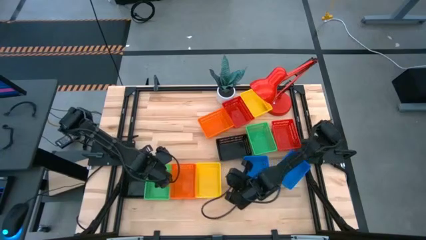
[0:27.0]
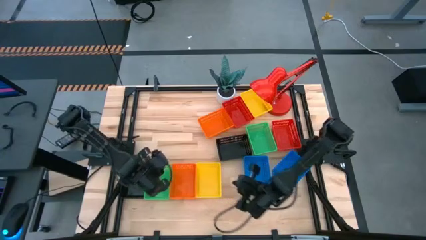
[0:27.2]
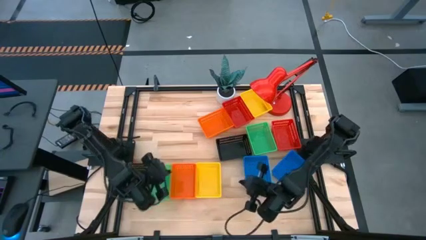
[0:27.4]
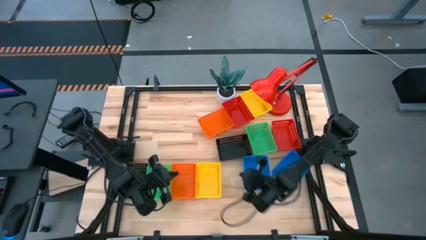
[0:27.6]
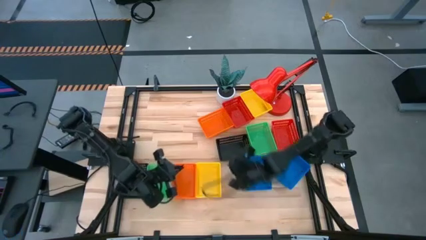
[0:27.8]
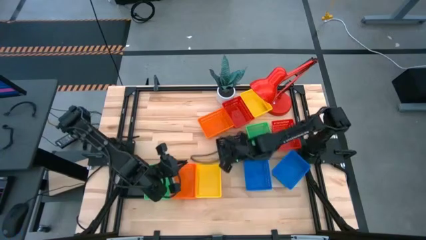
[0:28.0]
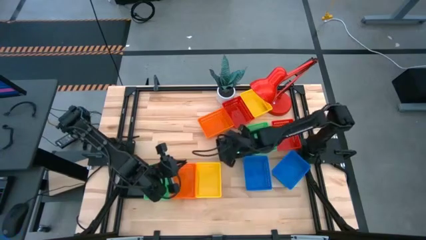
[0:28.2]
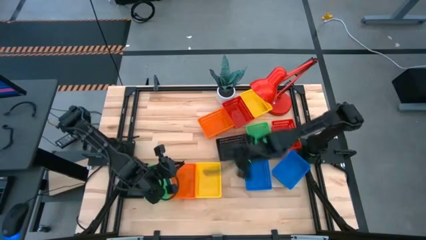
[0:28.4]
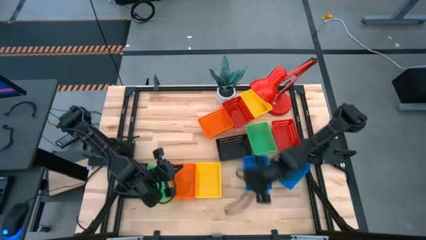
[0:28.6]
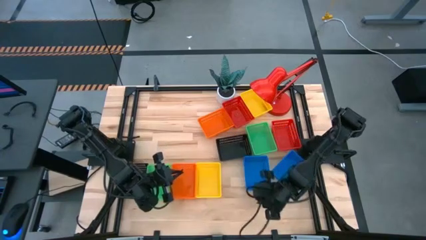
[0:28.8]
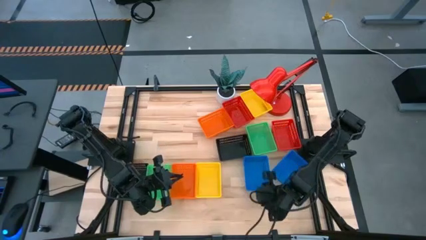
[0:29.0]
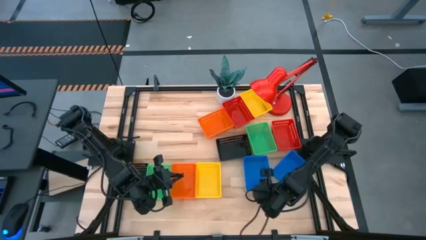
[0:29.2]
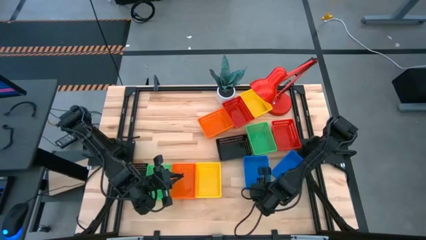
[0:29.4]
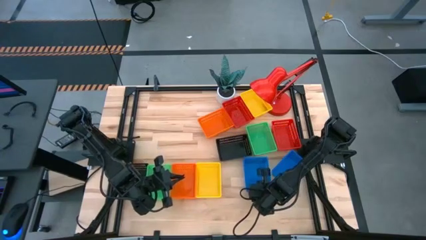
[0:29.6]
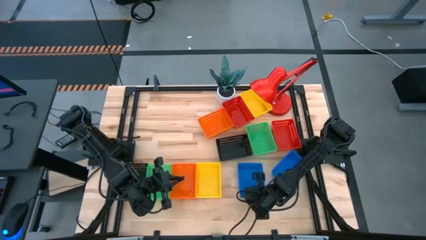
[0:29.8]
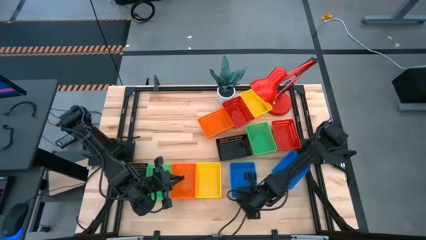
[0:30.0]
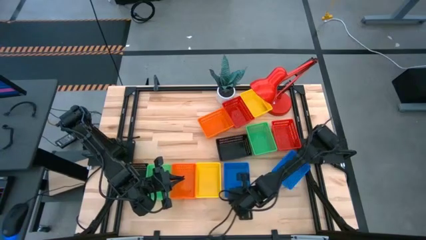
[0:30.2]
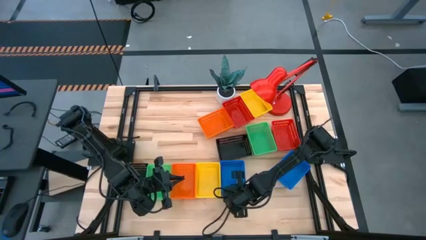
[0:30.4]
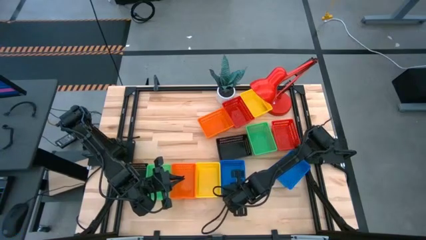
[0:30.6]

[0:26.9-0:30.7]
Move the left blue bin to the bottom center of the table

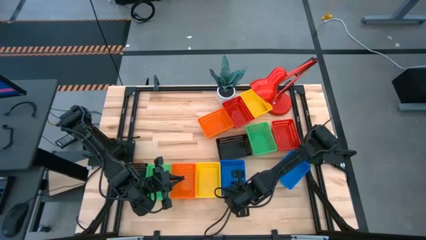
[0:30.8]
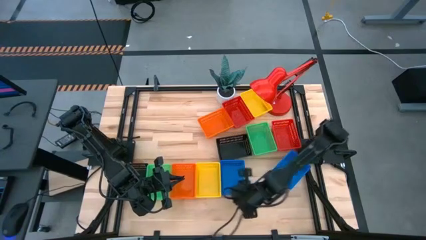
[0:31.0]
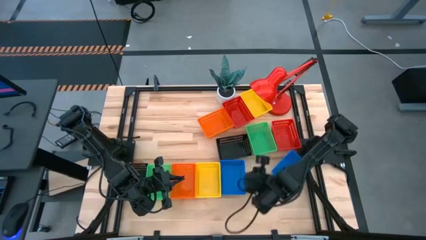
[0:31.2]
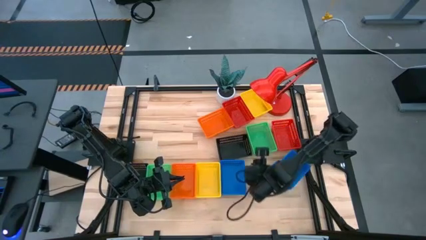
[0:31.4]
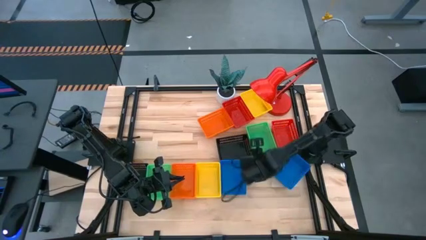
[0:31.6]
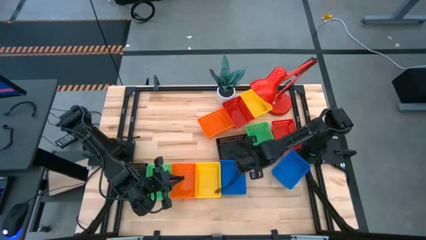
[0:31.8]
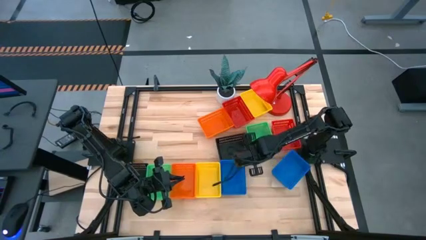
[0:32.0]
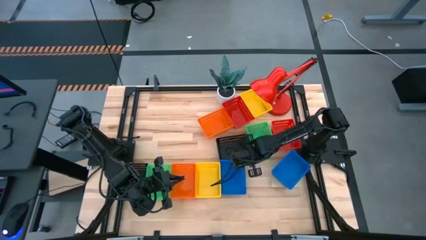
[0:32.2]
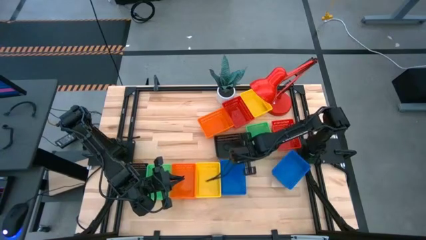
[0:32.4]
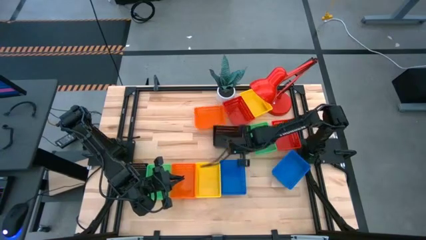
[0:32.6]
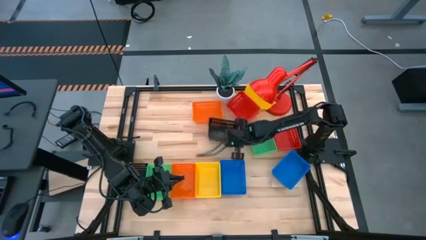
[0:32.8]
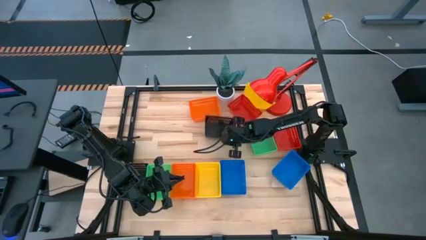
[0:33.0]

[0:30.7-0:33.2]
Move the top black bin to the top center of the table

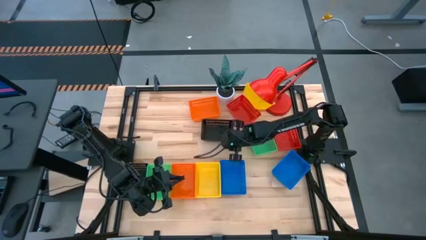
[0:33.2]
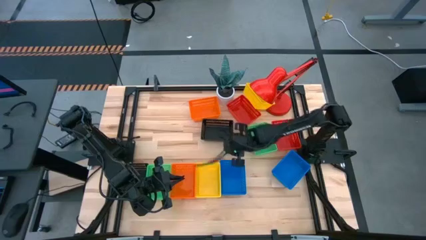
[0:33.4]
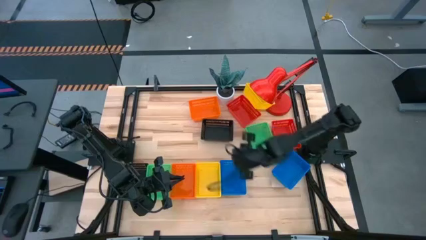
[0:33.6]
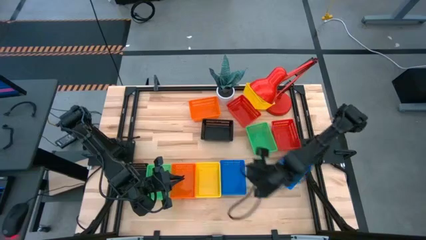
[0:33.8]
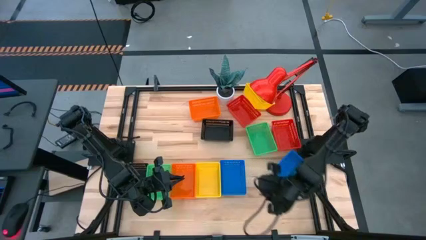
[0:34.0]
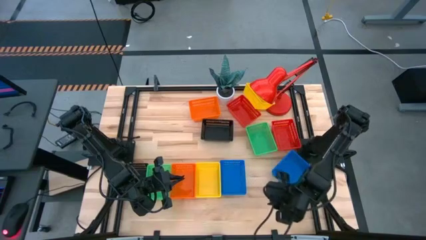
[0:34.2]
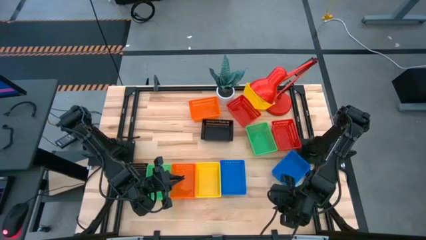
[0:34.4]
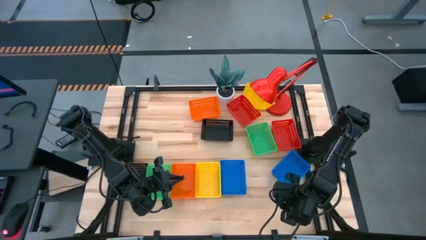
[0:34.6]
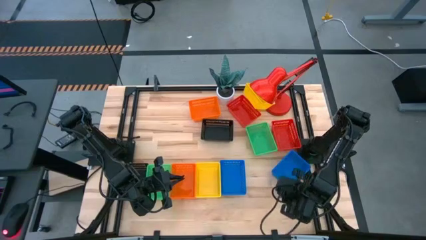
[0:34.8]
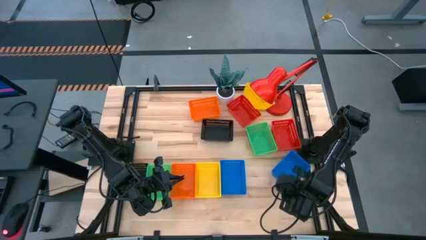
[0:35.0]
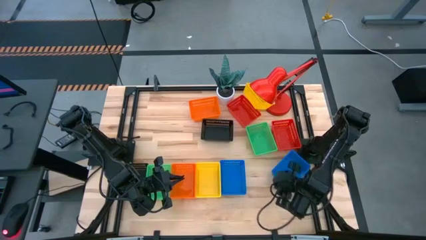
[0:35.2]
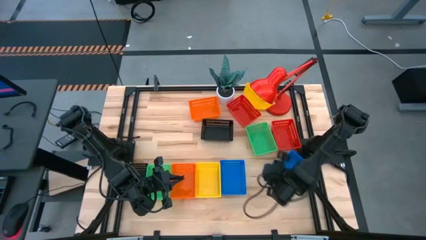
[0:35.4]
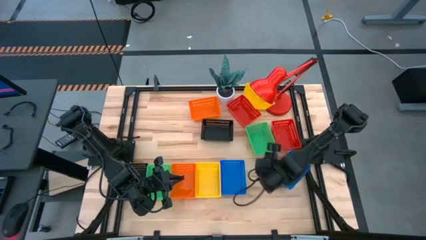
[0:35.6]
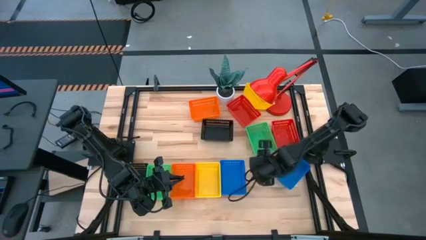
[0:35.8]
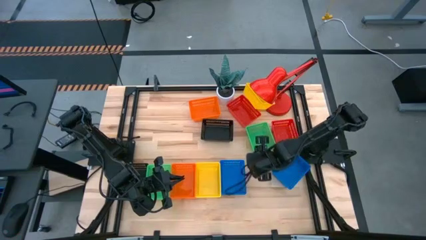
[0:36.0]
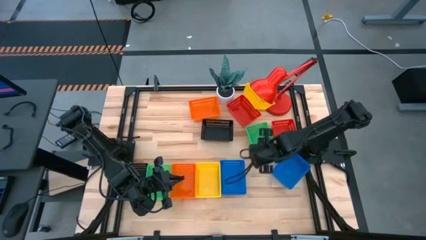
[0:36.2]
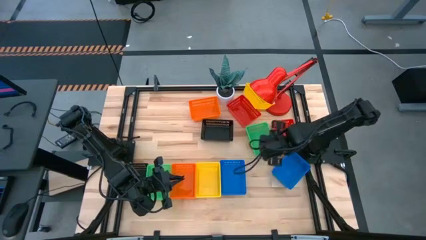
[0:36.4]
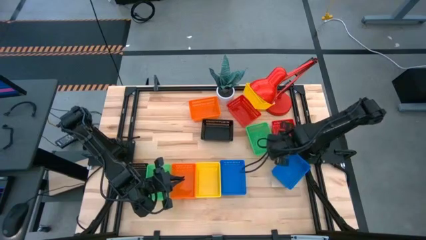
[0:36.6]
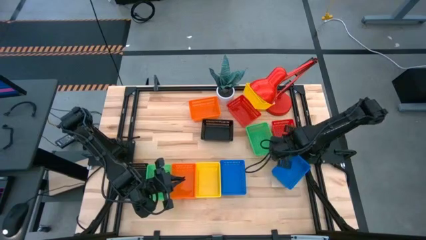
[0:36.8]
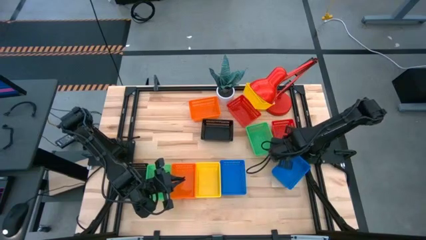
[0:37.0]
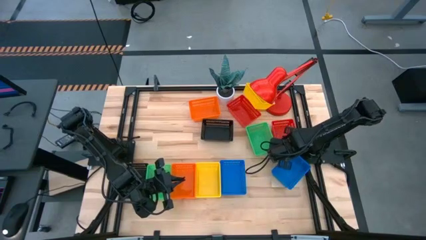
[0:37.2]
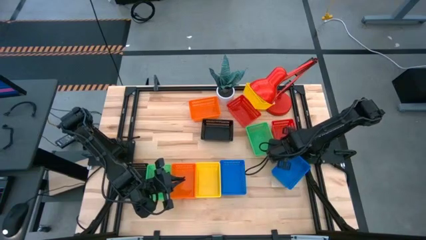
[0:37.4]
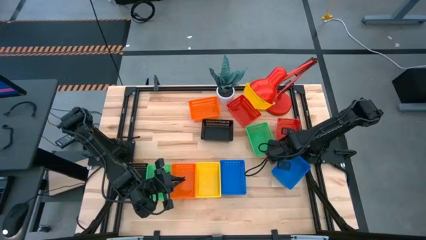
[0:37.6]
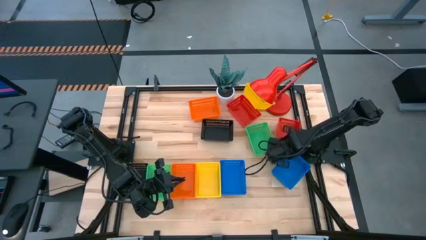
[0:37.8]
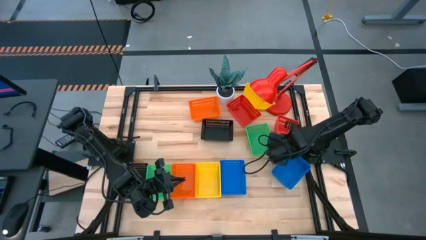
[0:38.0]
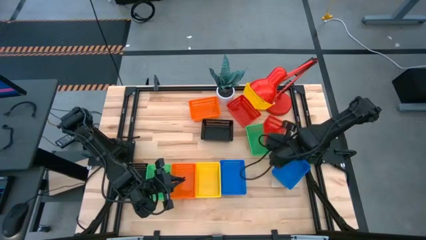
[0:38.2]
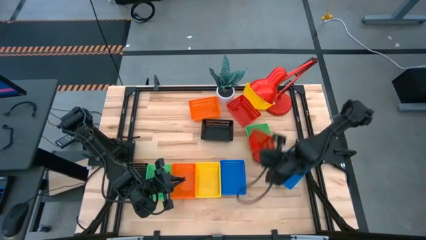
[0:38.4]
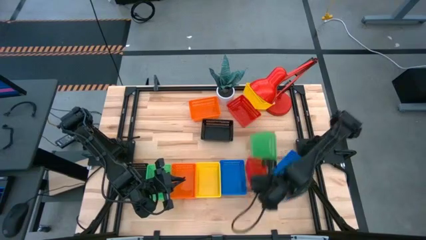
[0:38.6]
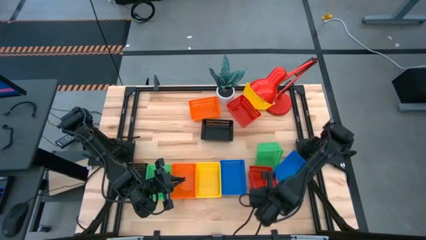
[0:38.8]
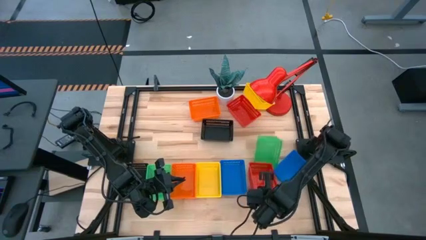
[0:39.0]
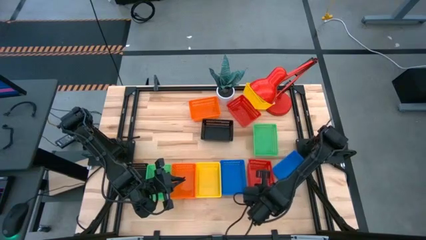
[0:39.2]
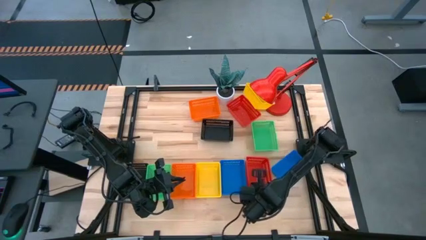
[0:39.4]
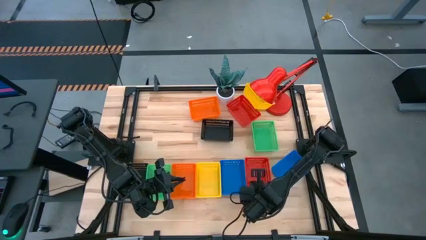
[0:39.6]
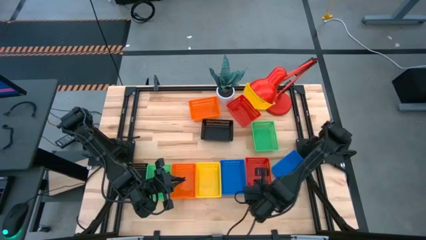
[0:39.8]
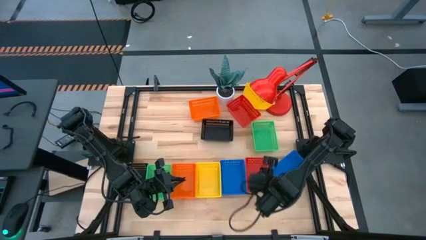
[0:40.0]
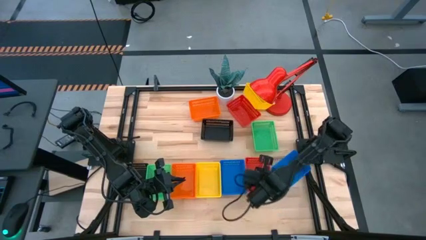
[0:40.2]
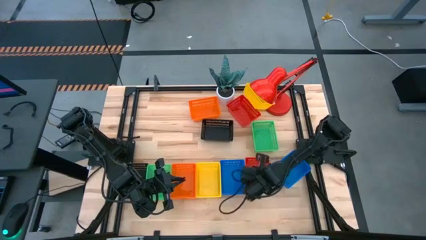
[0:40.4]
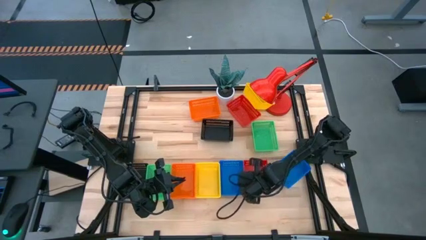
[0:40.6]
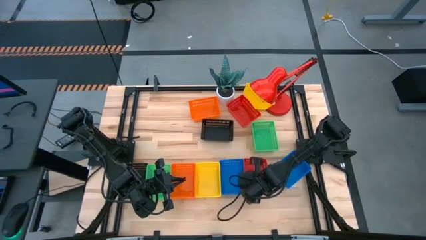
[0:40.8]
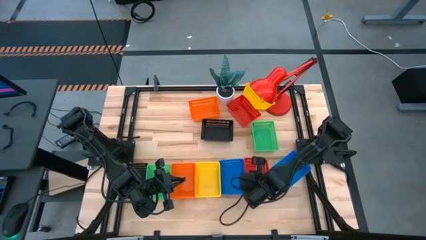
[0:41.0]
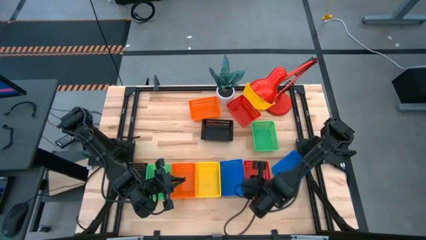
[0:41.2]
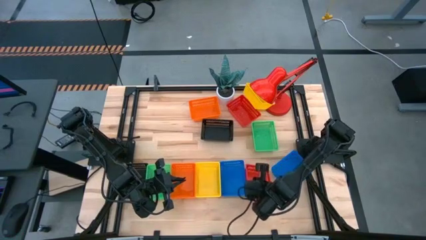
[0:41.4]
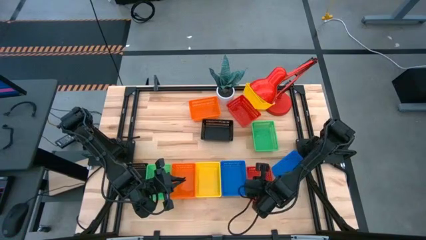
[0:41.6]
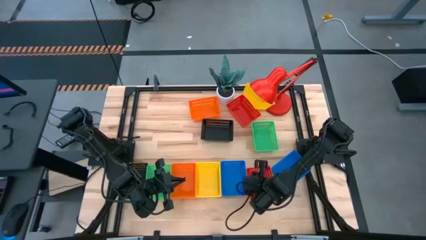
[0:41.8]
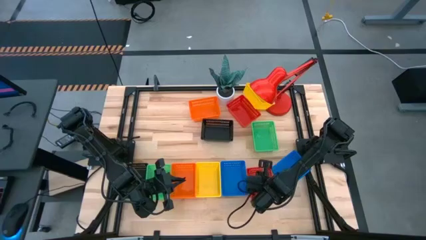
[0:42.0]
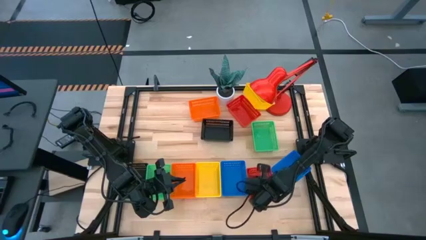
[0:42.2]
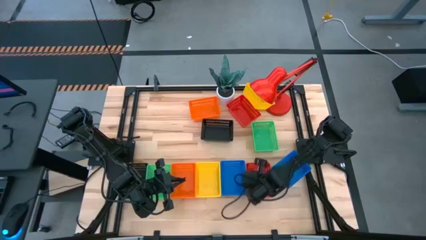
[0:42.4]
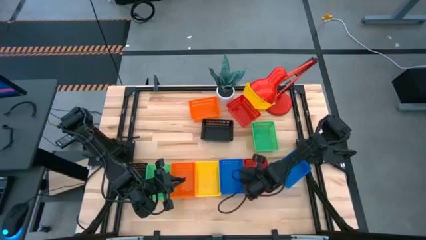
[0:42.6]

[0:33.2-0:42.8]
Move the right red bin to the bottom right of the table
